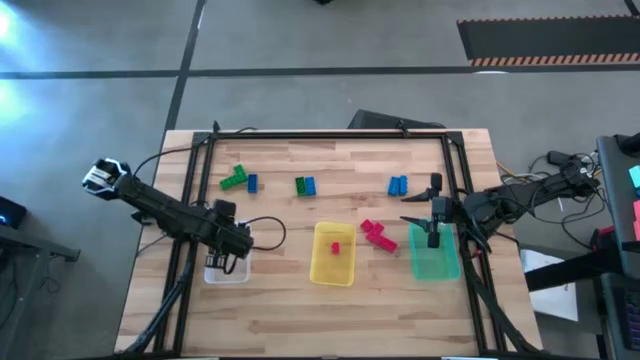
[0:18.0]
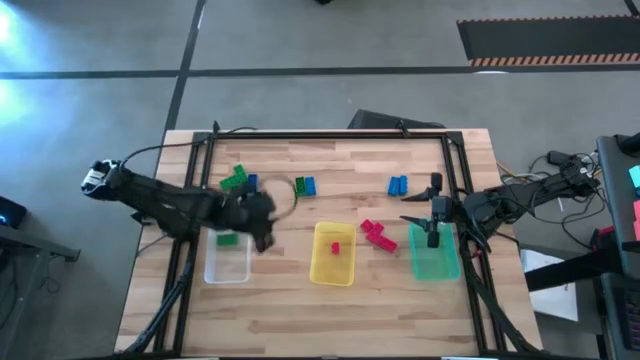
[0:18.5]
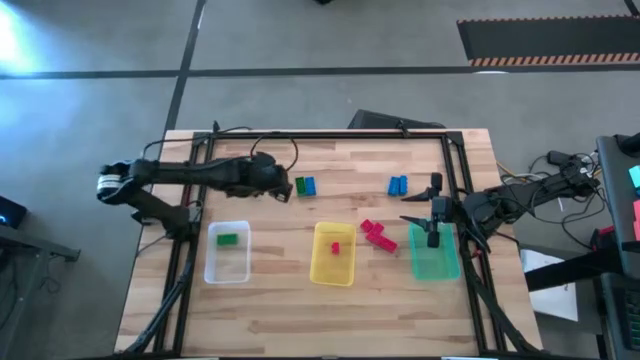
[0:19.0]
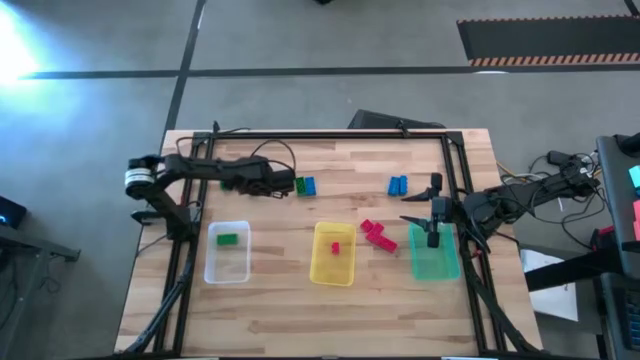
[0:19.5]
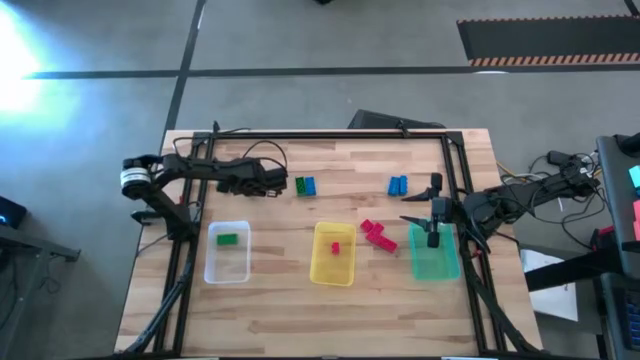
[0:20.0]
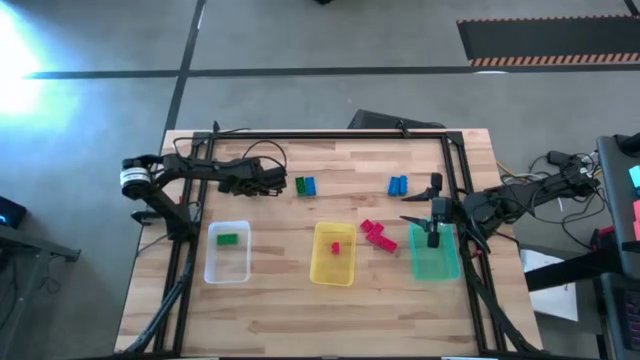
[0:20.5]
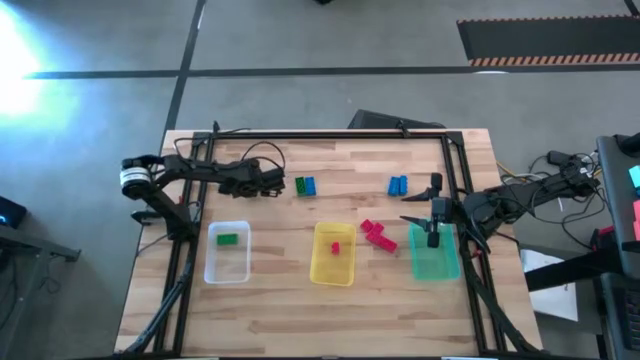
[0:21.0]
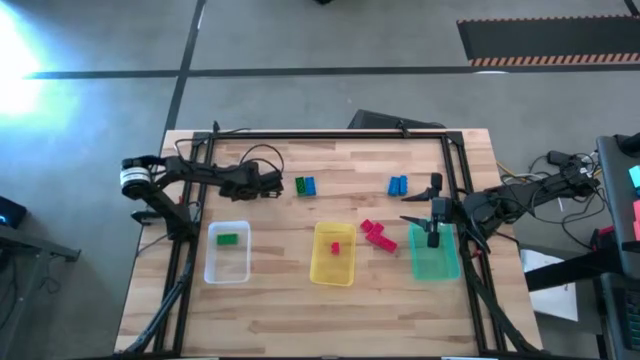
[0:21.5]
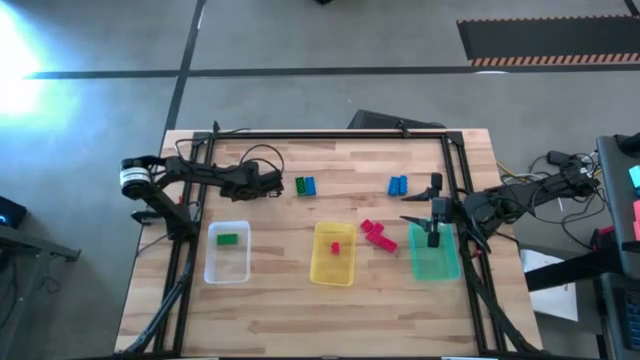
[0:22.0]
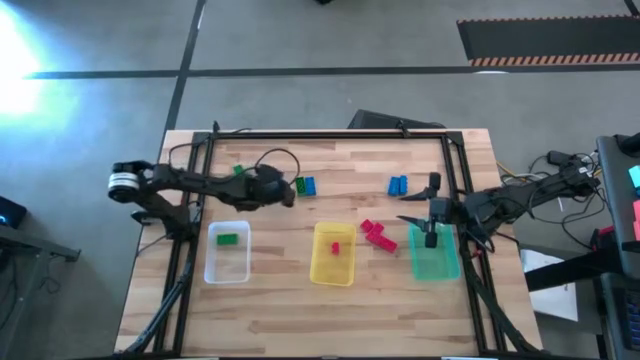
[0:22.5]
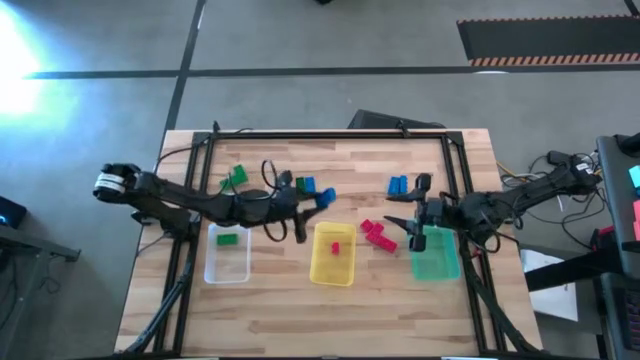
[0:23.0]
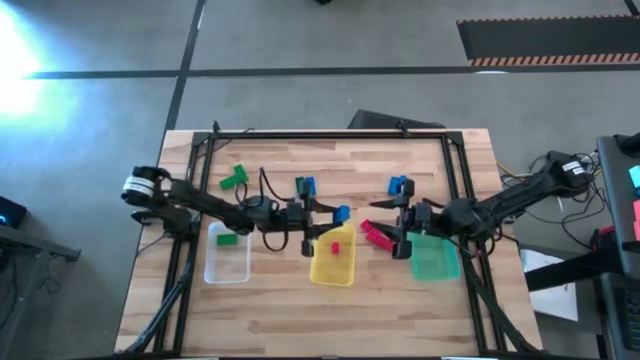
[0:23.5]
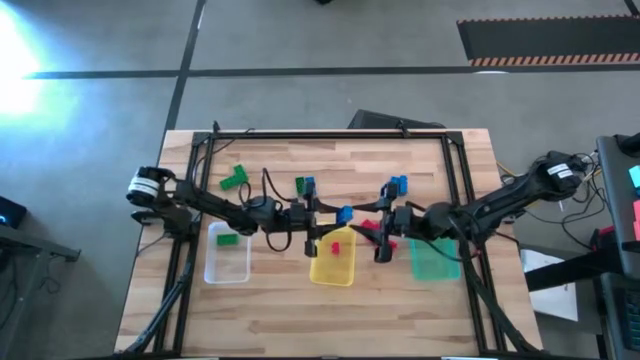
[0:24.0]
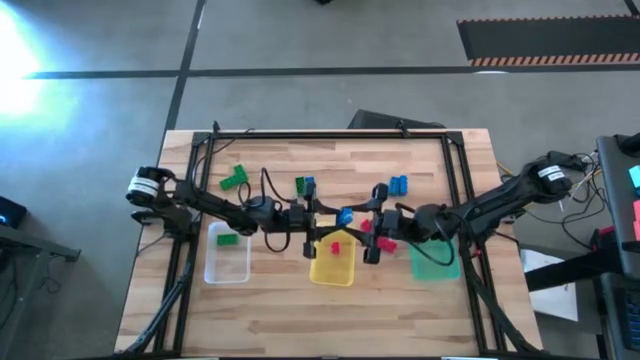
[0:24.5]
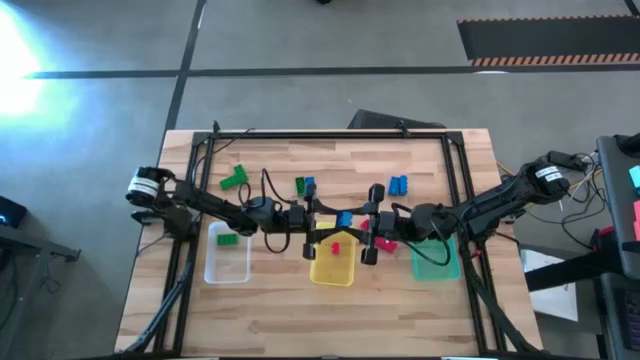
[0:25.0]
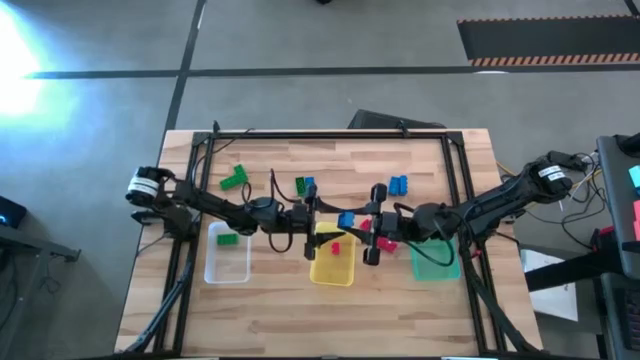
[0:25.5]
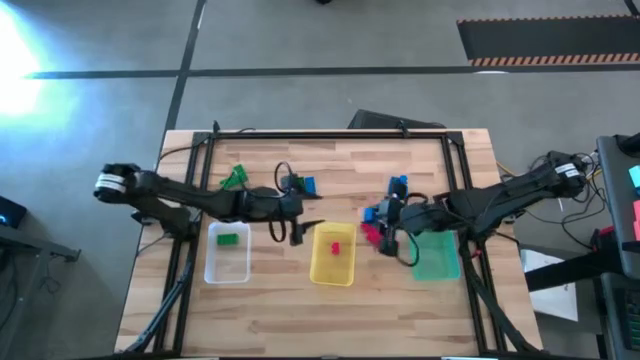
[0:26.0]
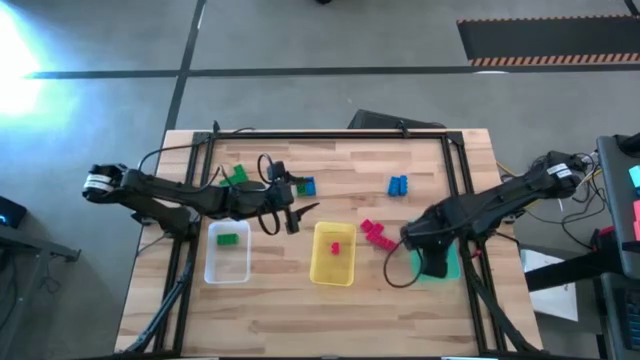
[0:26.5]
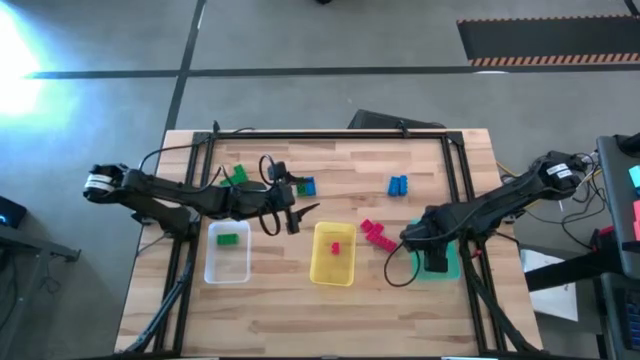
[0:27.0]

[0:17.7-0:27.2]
Task: Sort & place blocks by color
Put the blue game piece into the green bin

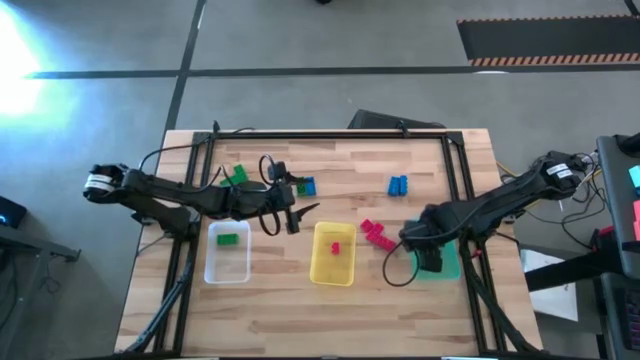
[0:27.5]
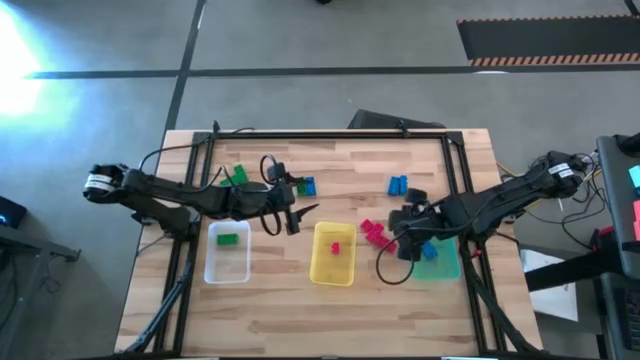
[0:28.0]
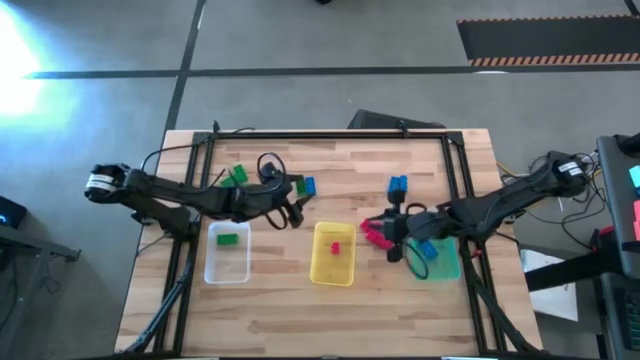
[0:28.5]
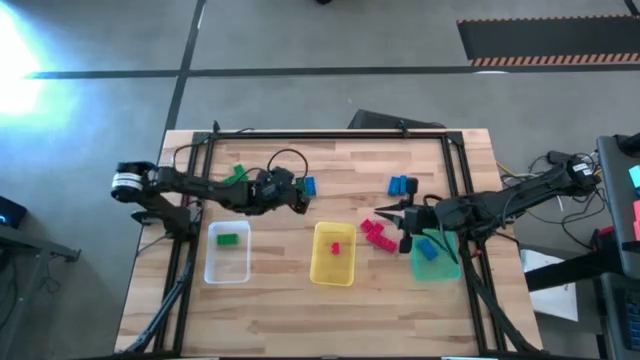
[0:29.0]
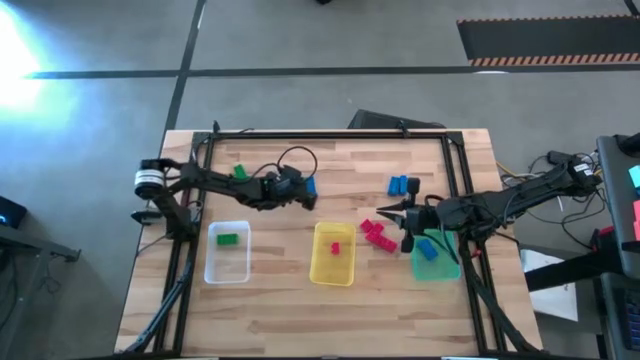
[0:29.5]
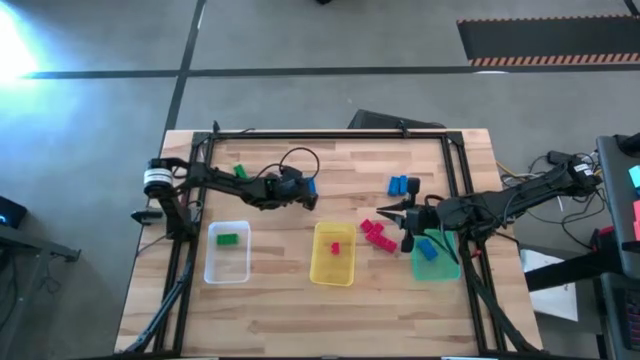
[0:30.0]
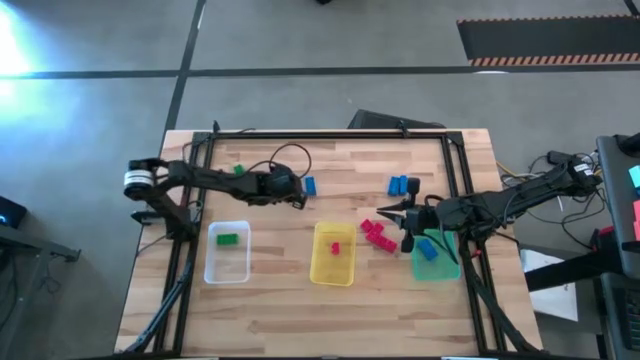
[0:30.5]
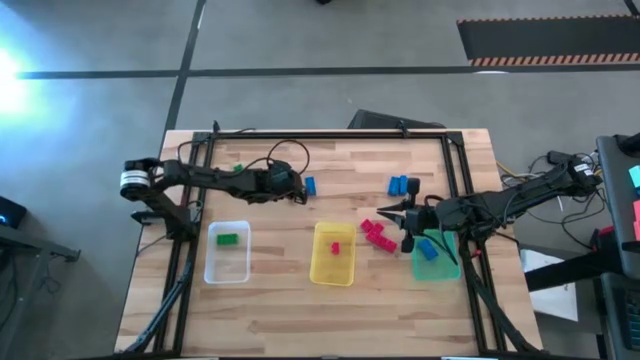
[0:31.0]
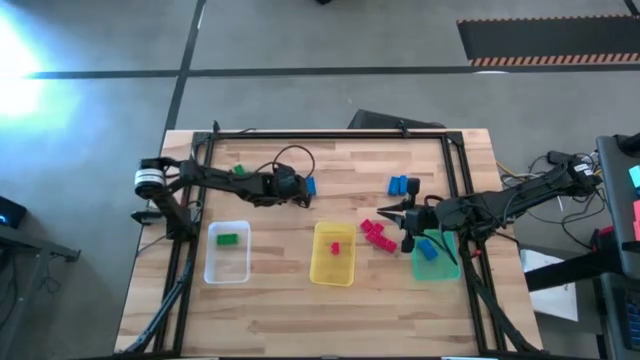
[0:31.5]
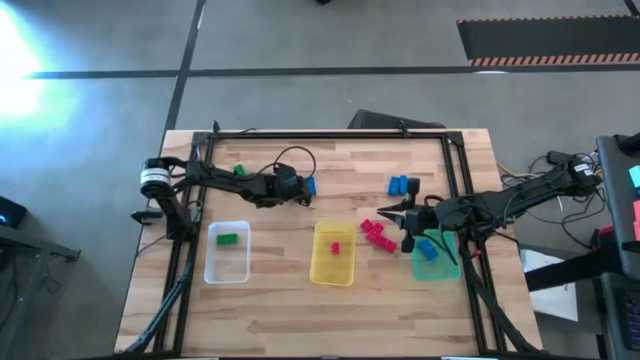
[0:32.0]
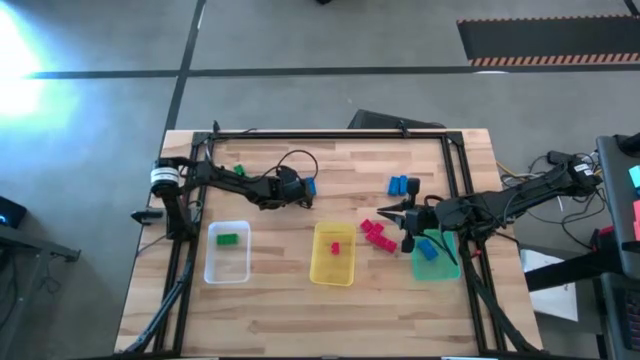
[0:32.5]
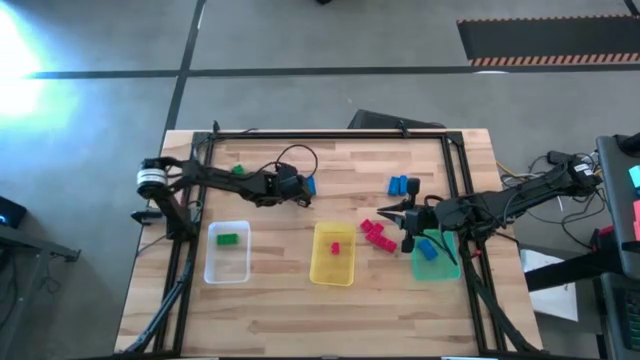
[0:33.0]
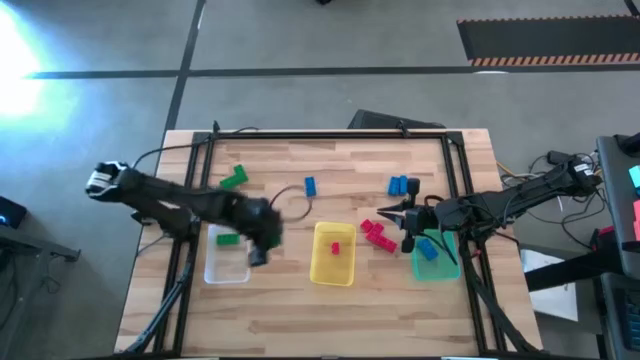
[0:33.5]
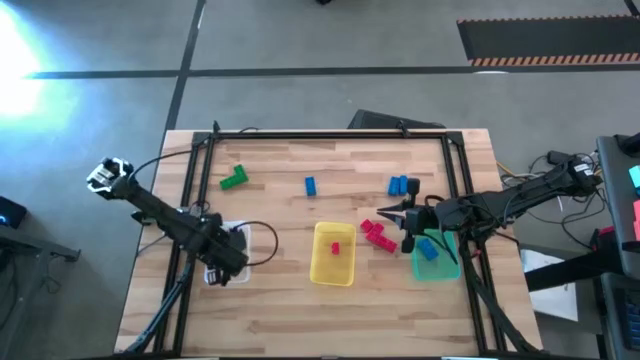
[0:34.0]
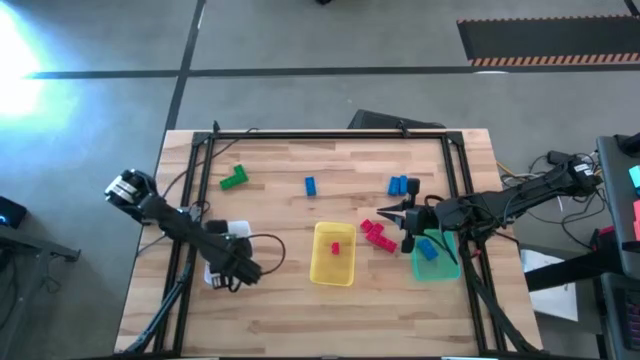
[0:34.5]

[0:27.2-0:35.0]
Put the green game piece into the transparent bin

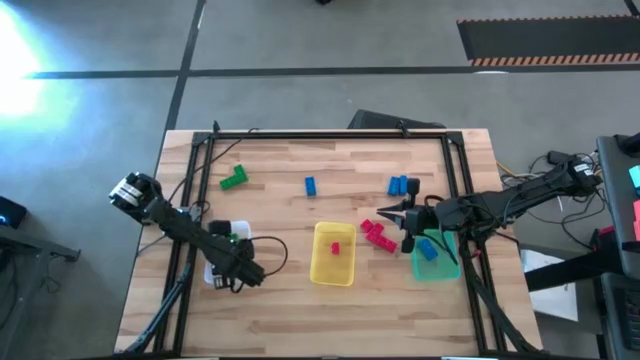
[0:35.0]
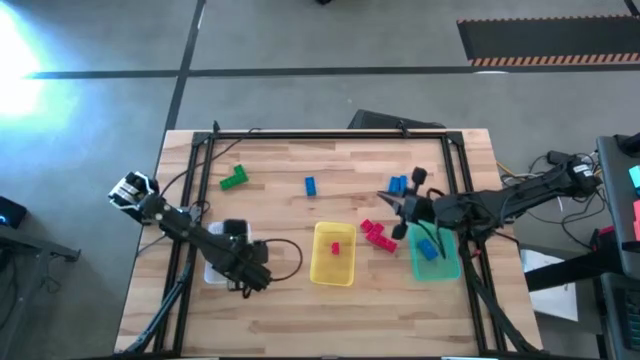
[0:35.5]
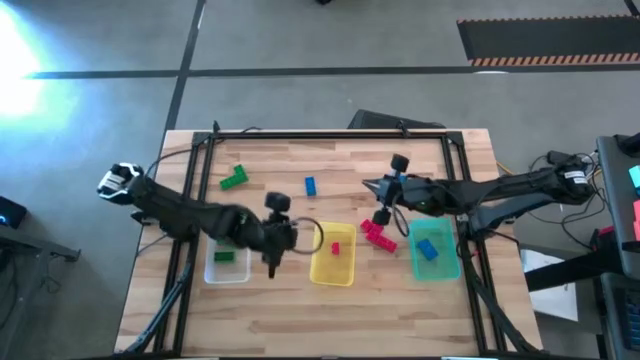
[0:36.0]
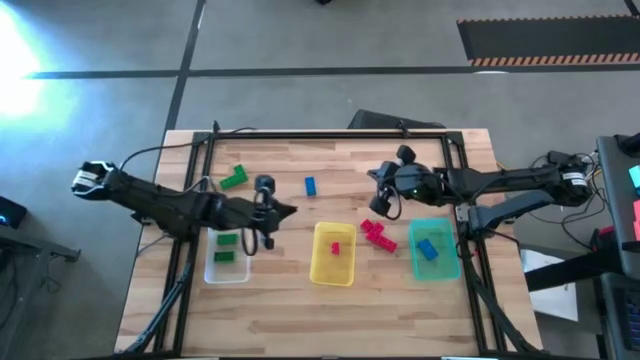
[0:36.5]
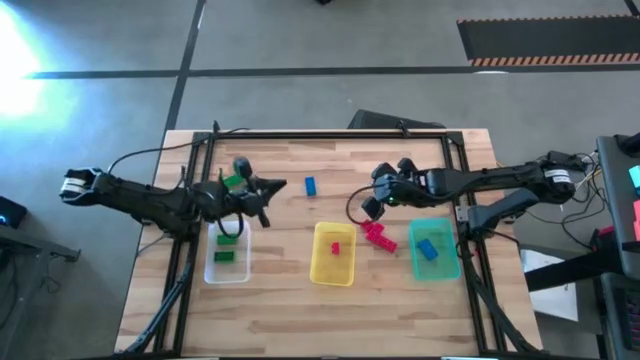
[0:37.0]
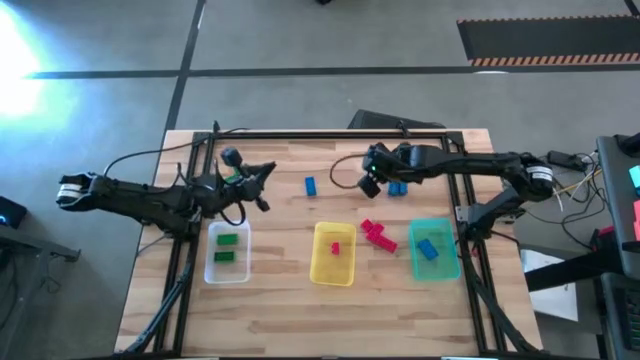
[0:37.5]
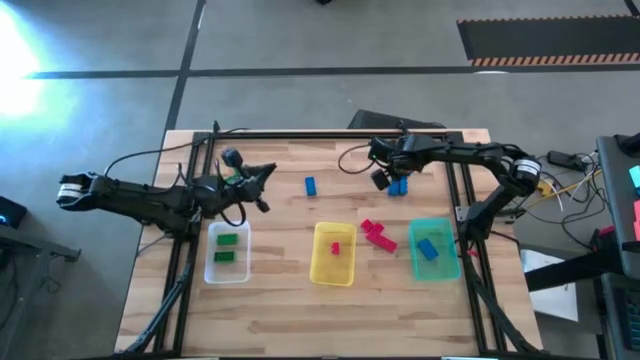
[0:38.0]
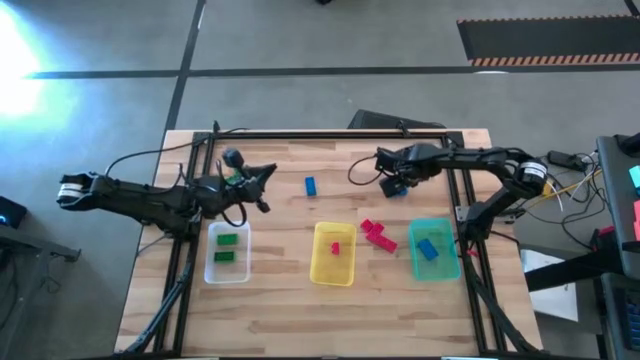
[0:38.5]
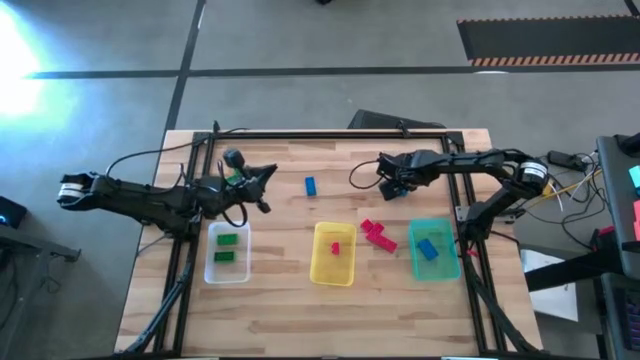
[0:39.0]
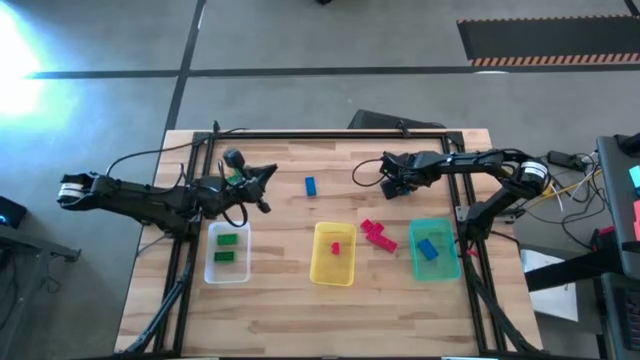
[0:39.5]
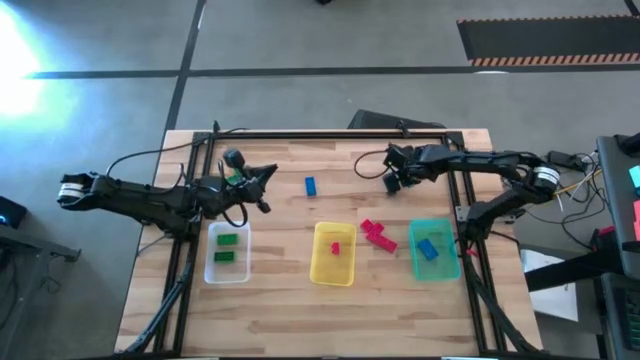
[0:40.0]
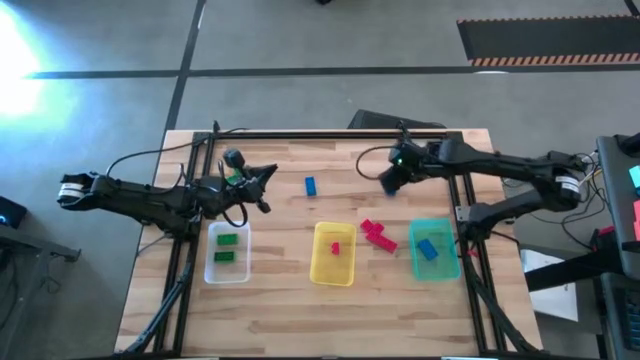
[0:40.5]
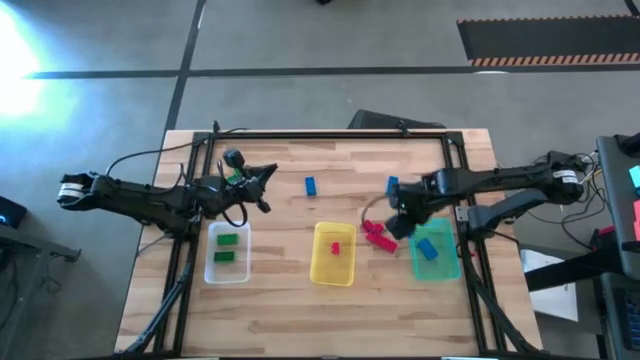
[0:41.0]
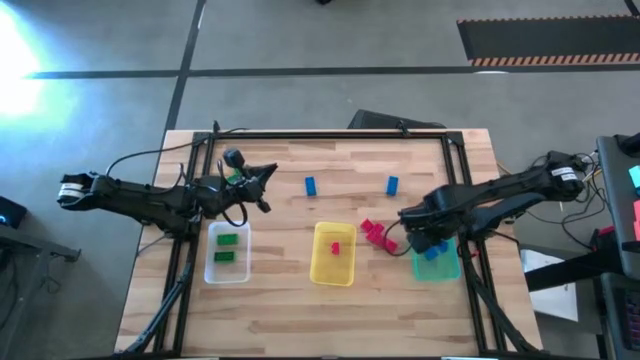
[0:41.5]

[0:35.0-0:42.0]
Put the blue game piece into the green bin
